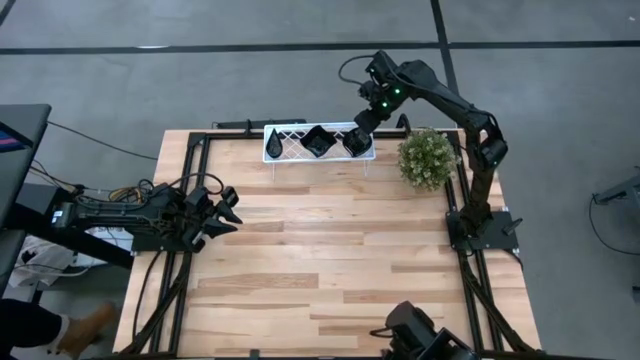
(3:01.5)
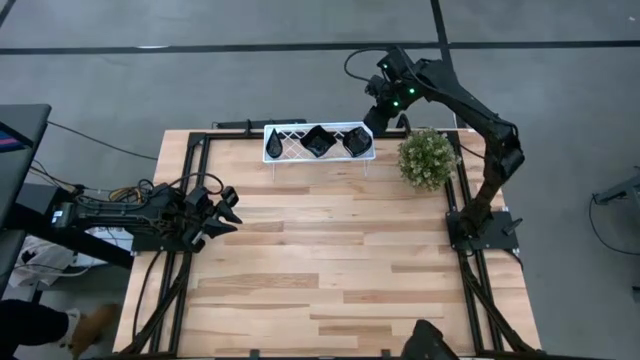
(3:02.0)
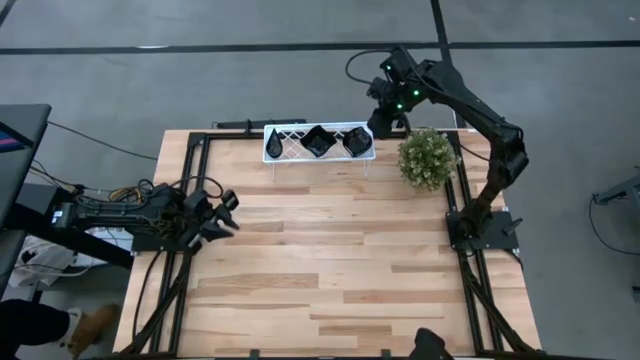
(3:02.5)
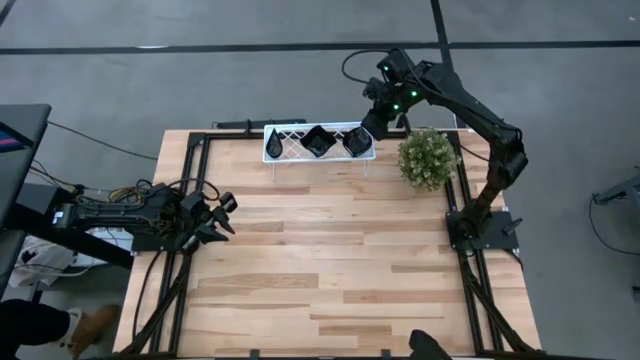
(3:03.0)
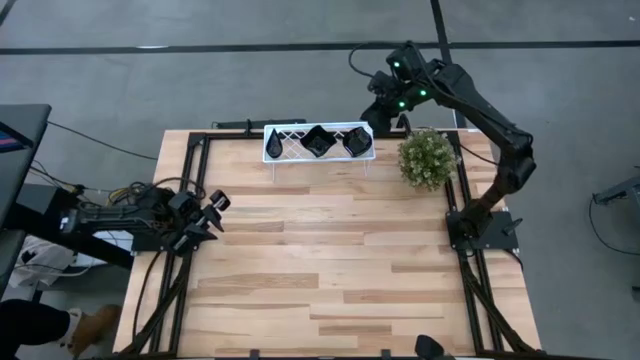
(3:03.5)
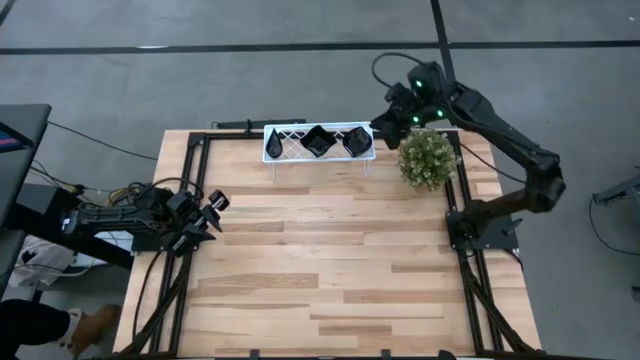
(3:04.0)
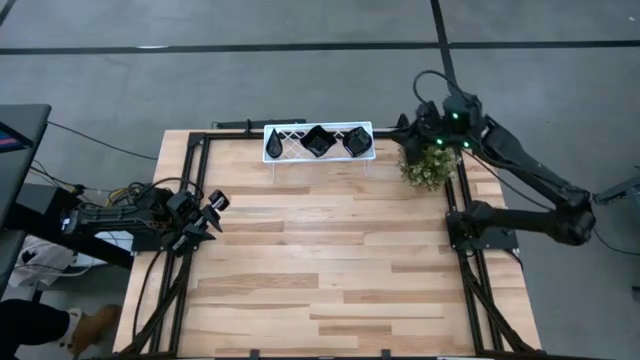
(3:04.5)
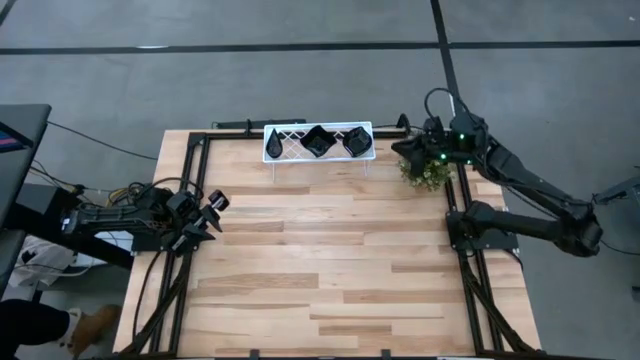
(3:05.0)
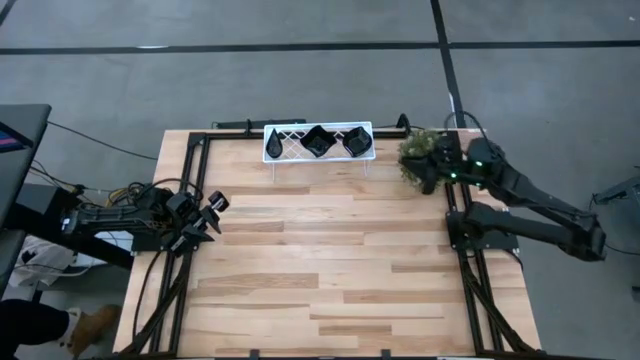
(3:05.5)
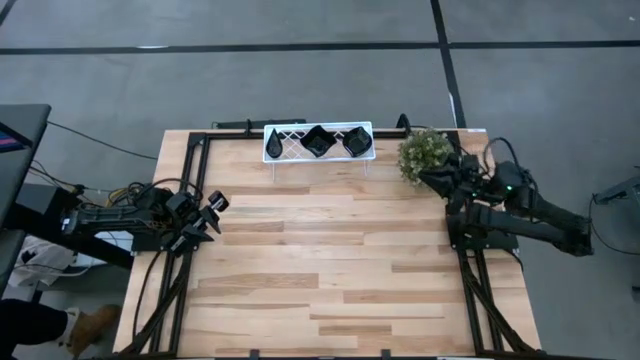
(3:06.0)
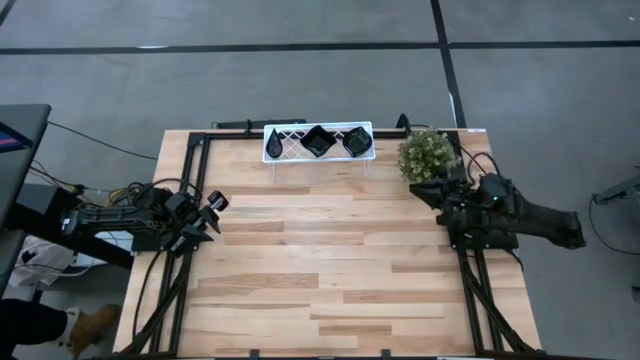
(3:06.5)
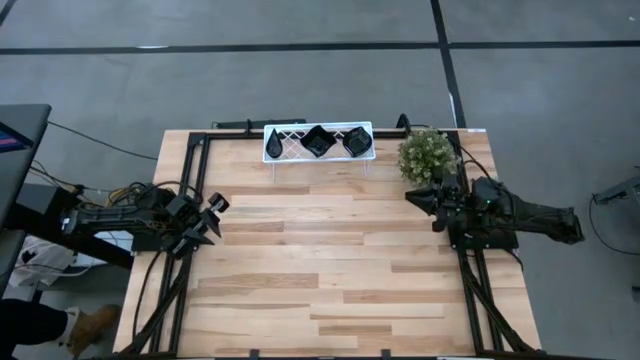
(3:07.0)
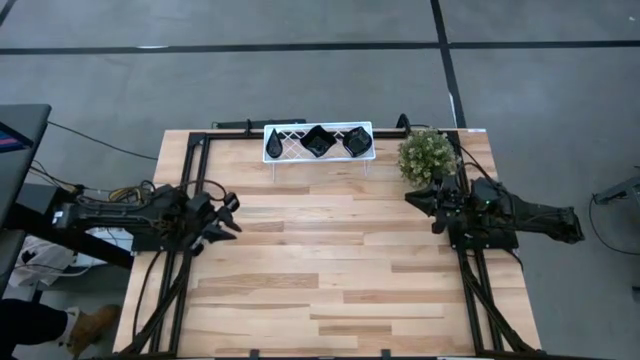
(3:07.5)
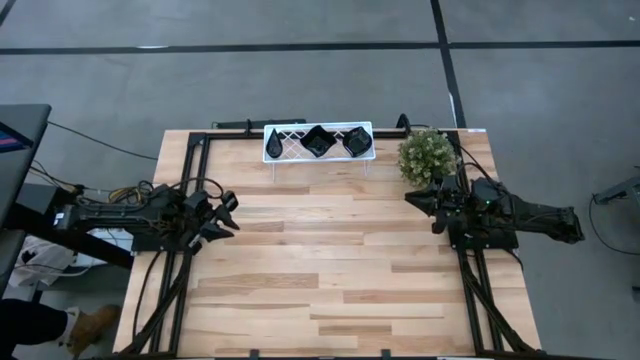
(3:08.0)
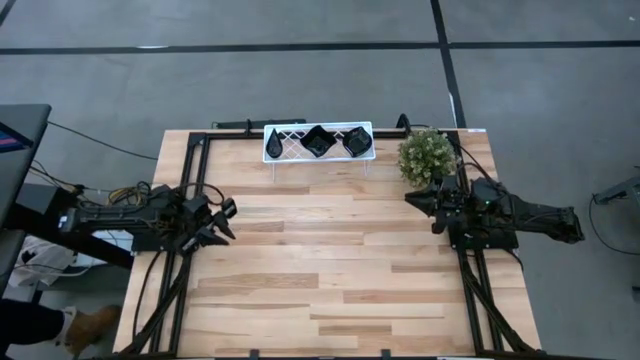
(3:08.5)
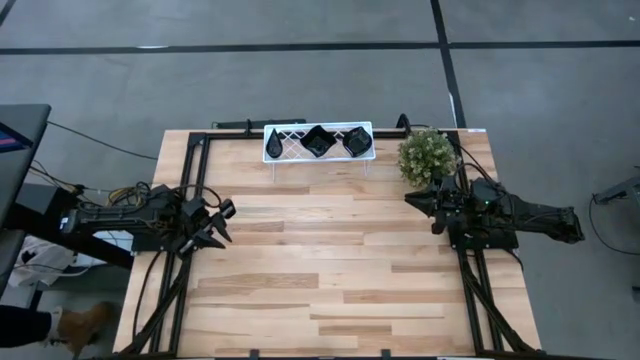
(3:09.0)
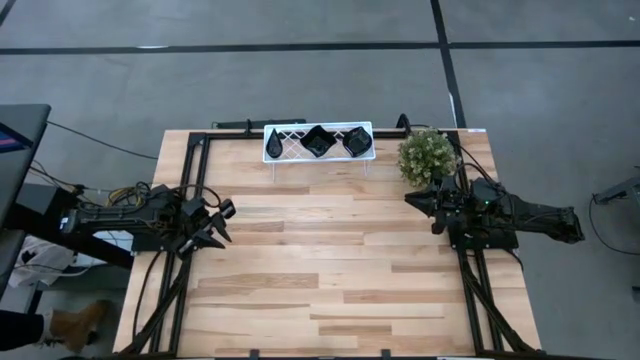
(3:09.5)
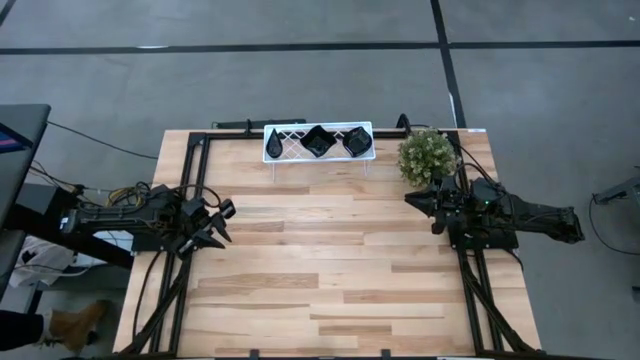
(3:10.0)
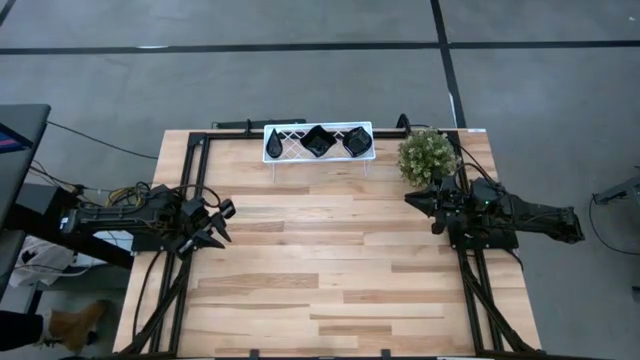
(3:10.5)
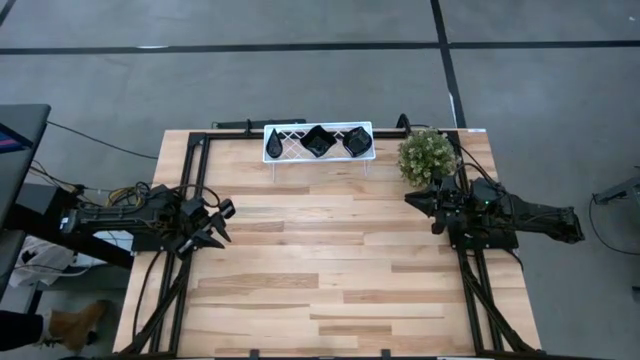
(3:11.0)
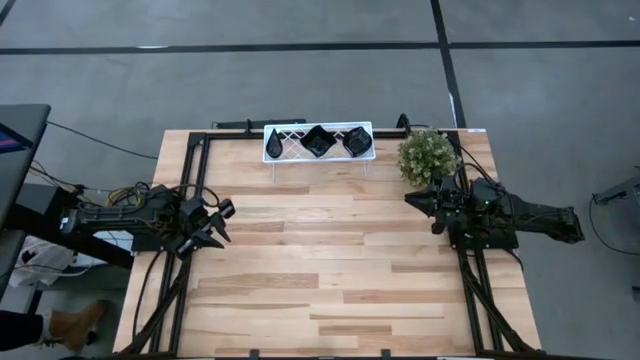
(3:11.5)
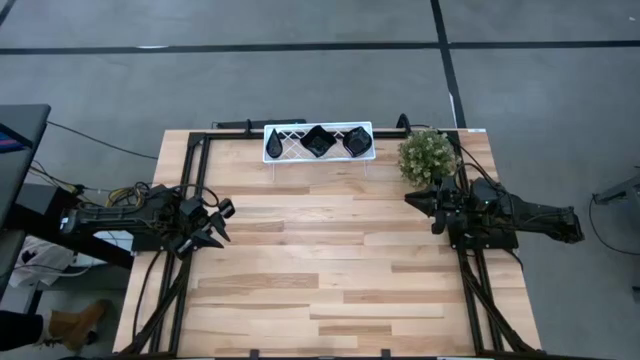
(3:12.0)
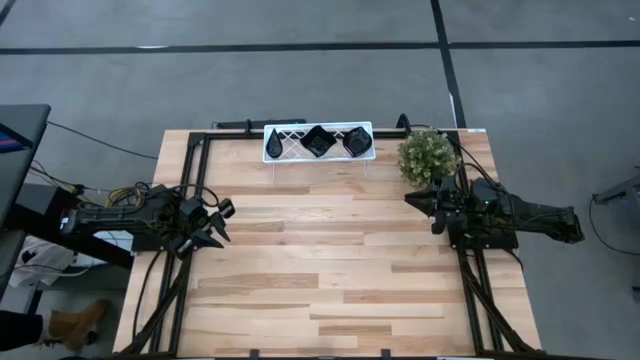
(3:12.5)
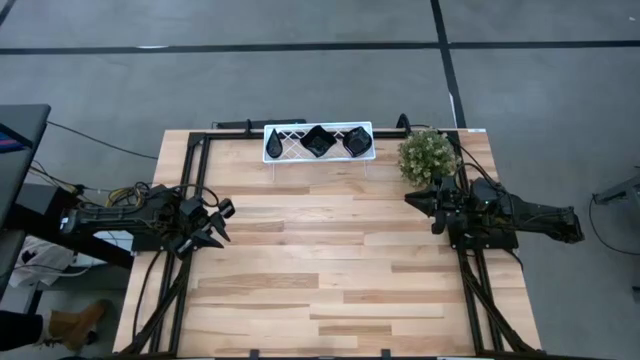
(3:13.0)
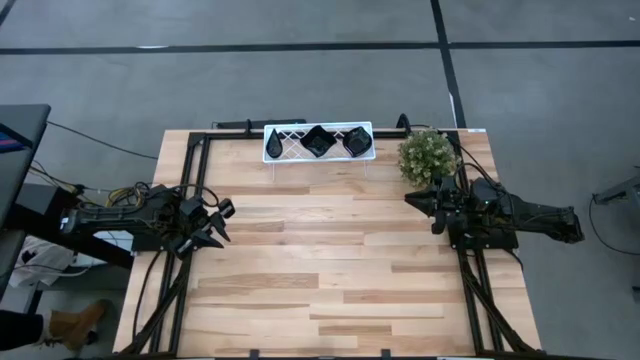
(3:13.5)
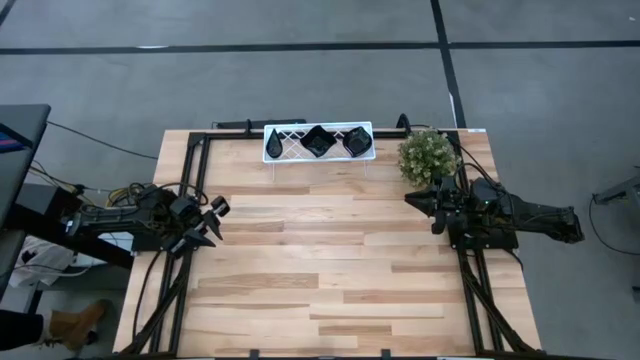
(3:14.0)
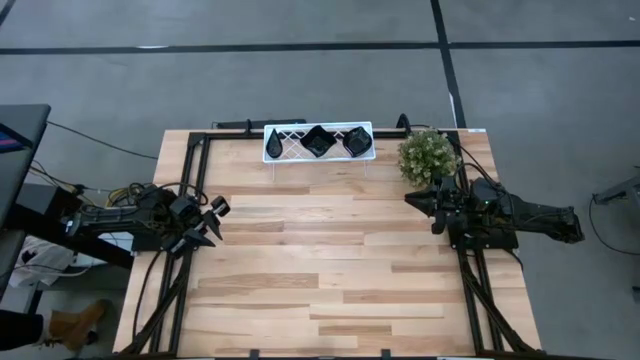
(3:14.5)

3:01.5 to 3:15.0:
Task: Pick & Place Mini shaped plates
Return to Home Position

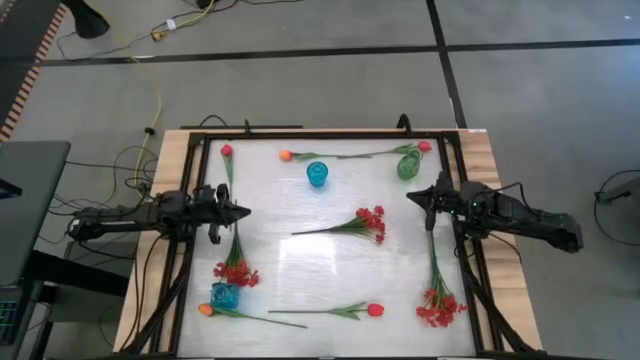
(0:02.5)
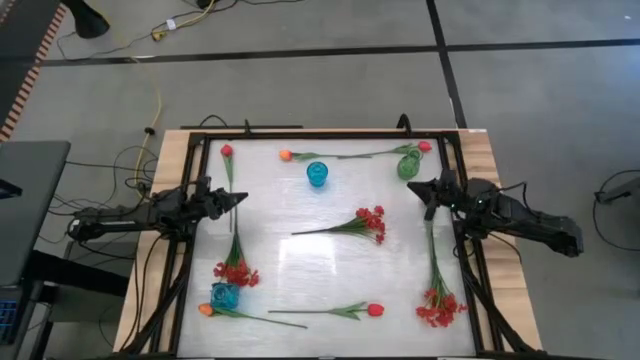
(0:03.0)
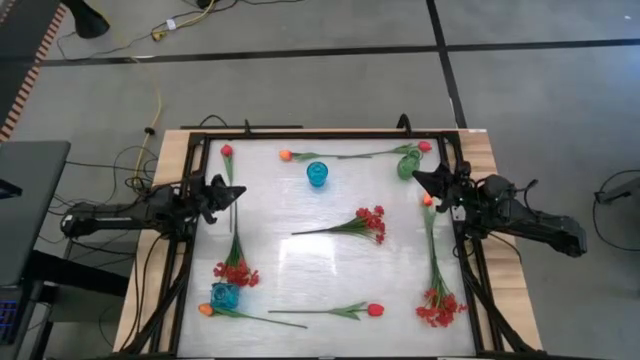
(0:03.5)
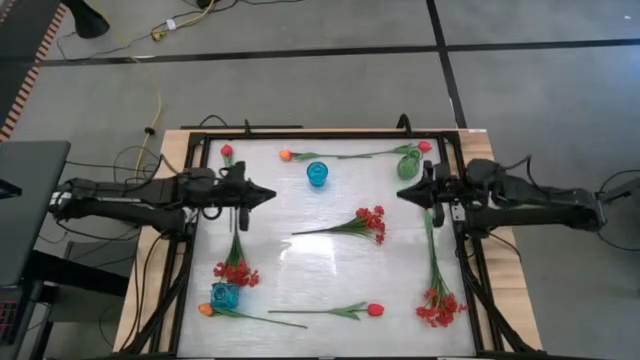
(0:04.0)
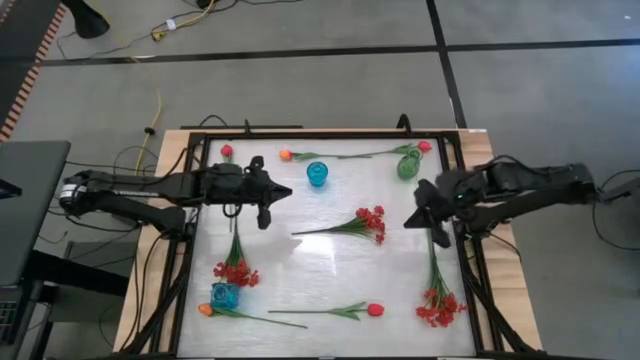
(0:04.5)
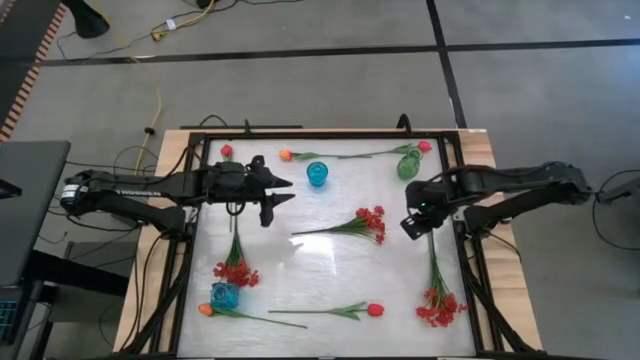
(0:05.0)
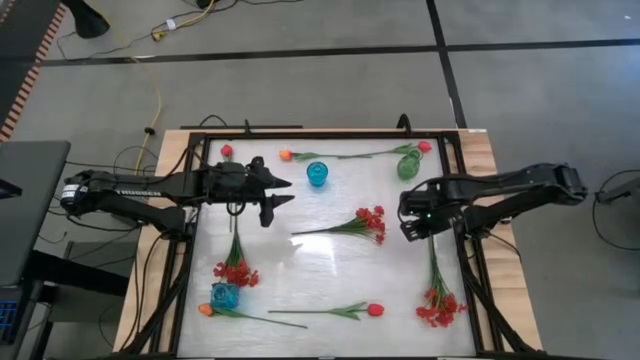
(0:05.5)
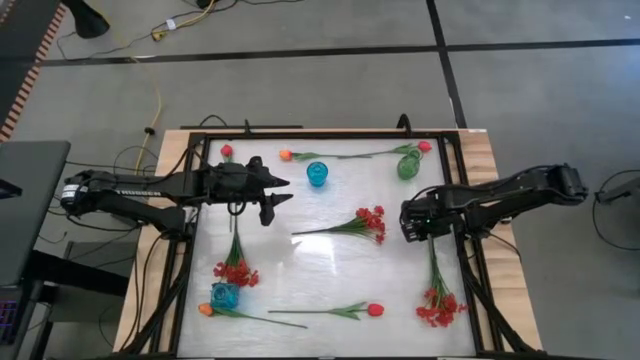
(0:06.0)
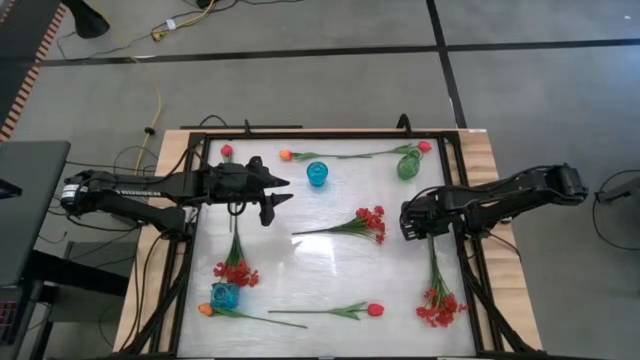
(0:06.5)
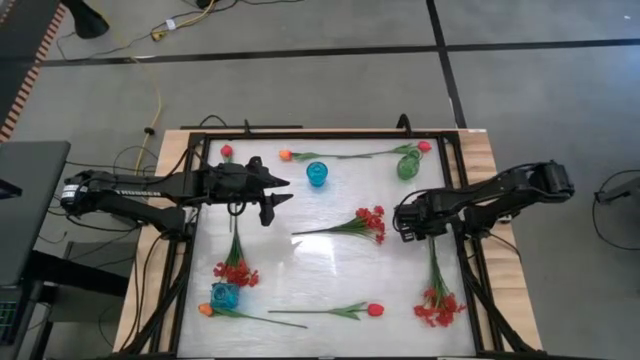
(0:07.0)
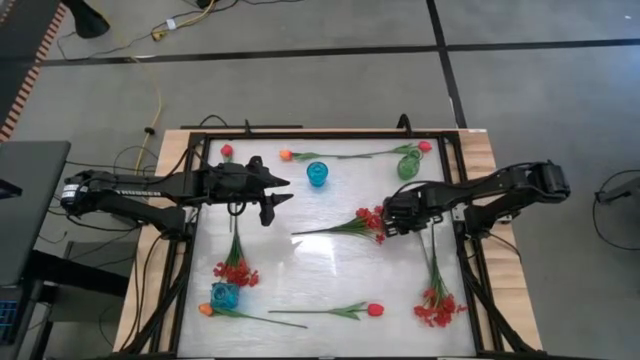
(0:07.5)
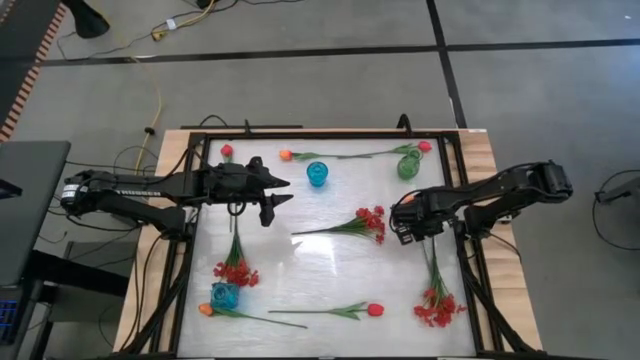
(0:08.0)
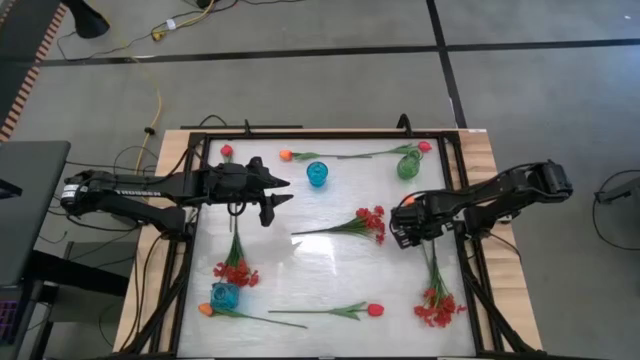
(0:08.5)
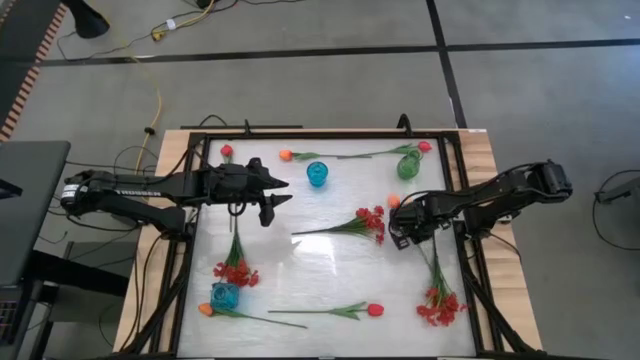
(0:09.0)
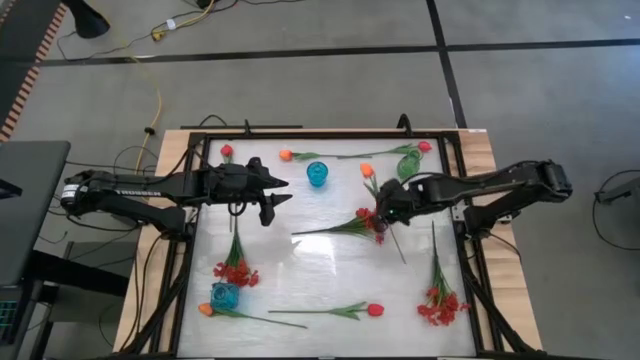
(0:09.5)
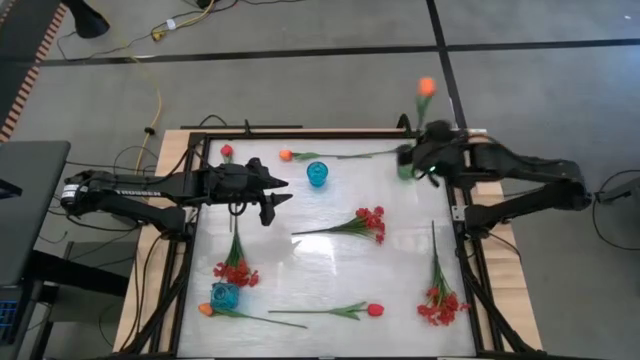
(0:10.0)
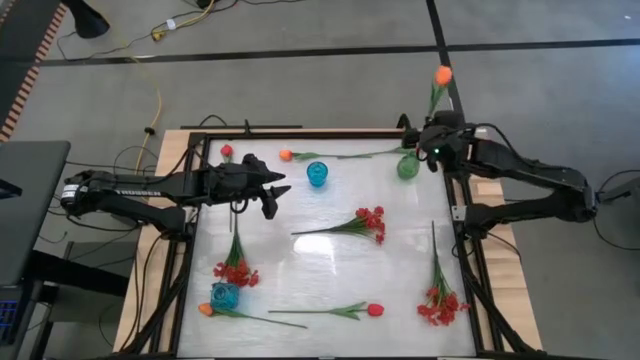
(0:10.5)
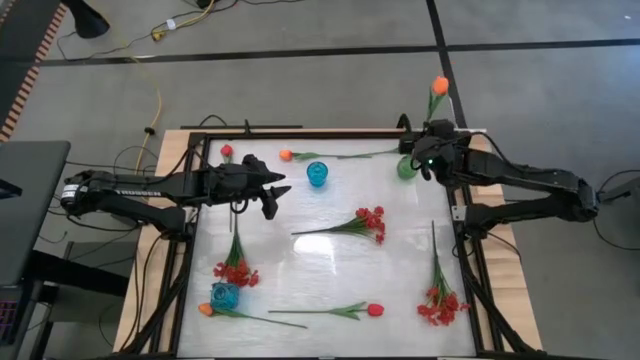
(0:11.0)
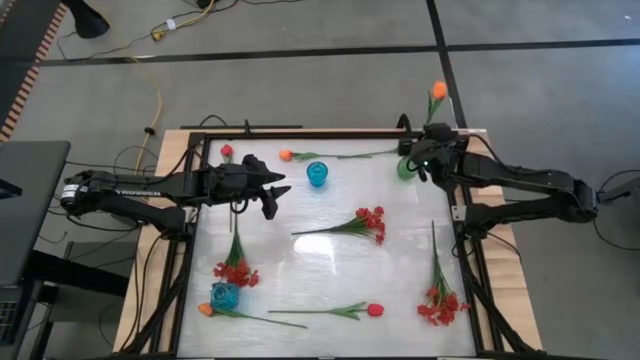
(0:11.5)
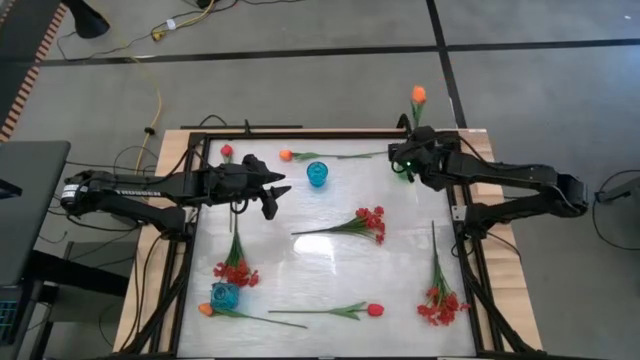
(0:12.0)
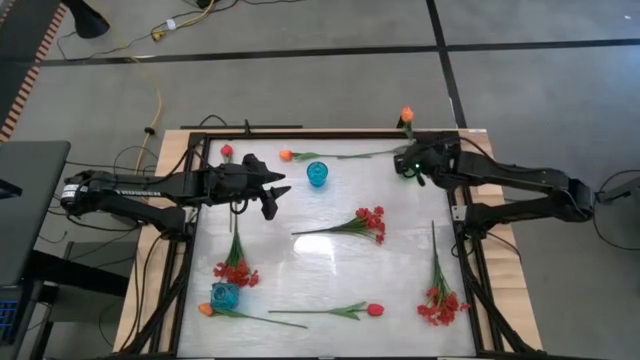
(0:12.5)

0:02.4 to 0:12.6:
Task: Sort flowers into vase by color
Put the middle orange tulip into the green vase
